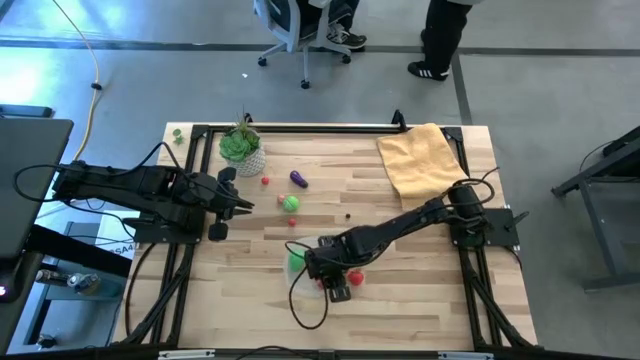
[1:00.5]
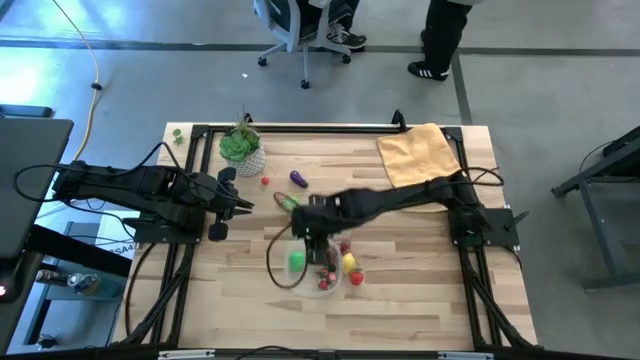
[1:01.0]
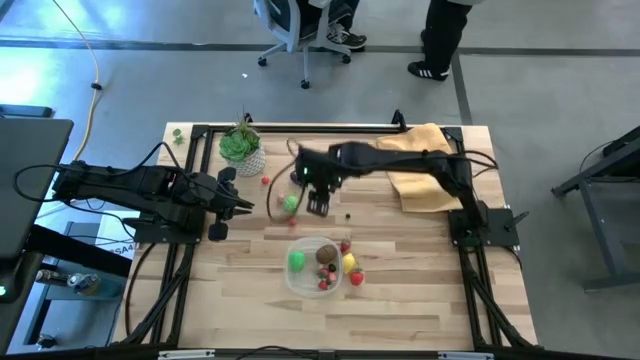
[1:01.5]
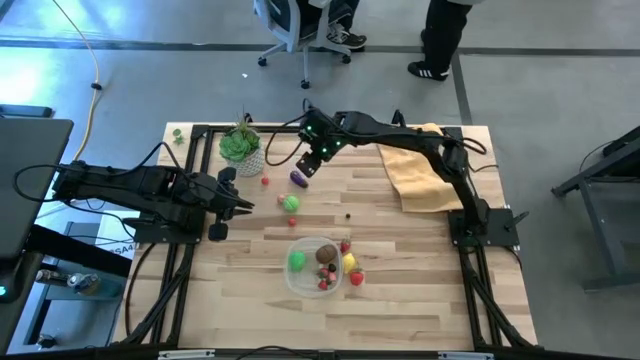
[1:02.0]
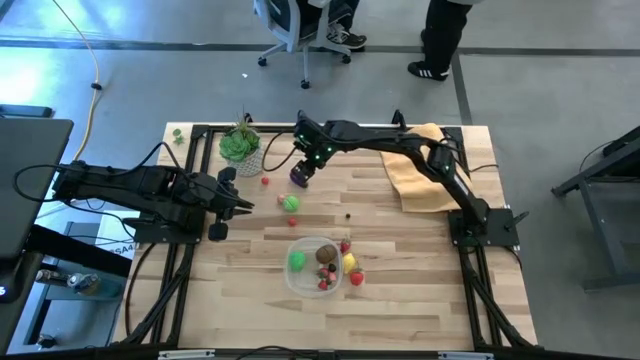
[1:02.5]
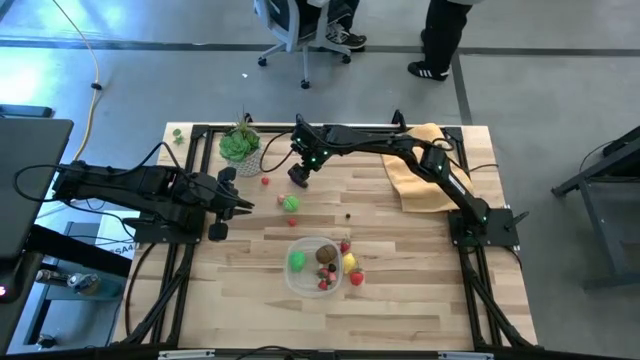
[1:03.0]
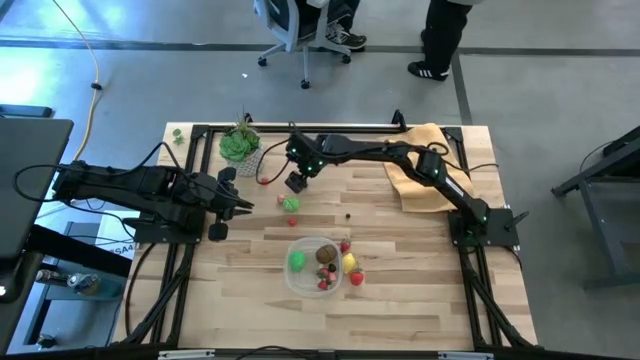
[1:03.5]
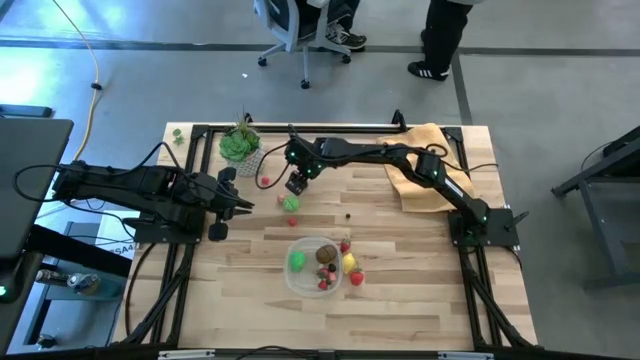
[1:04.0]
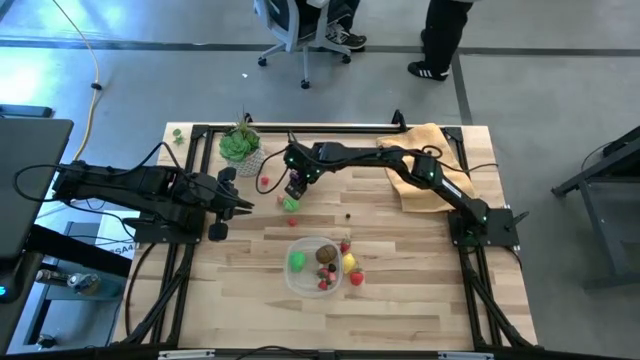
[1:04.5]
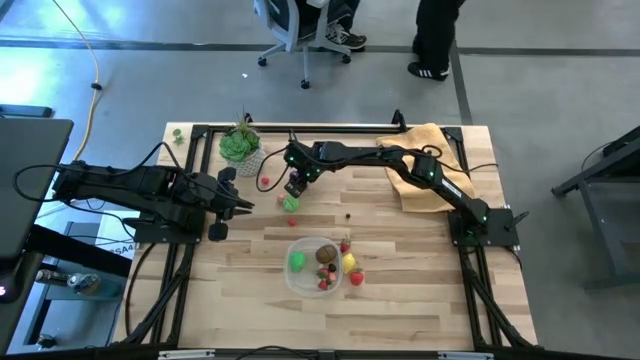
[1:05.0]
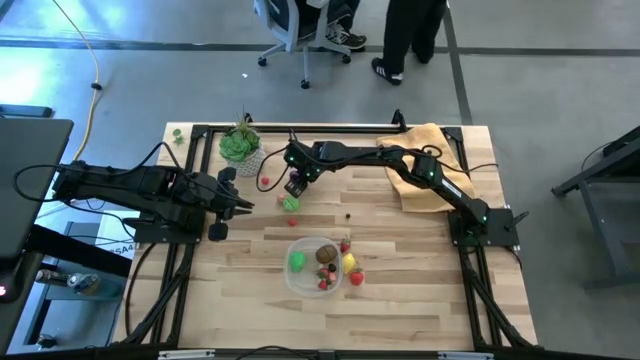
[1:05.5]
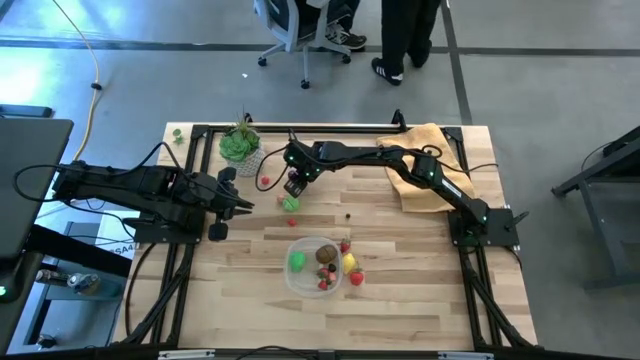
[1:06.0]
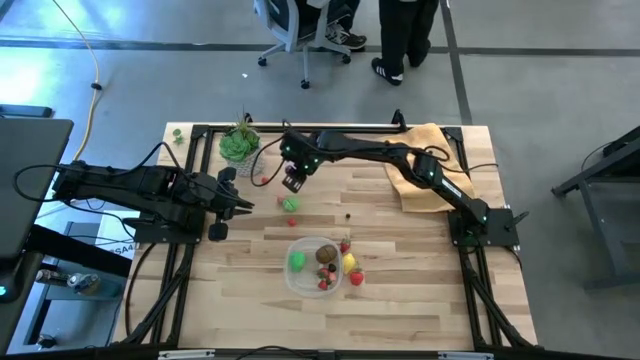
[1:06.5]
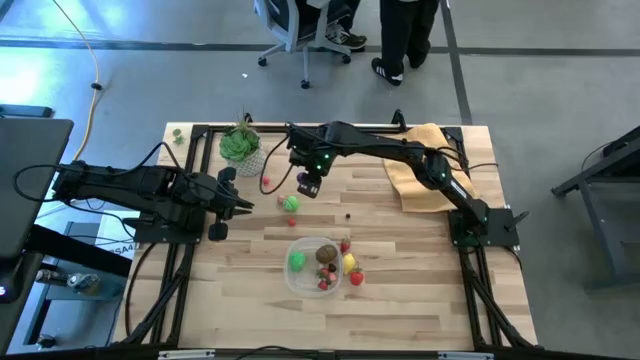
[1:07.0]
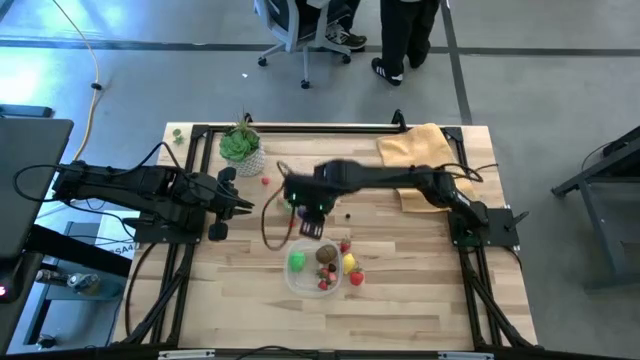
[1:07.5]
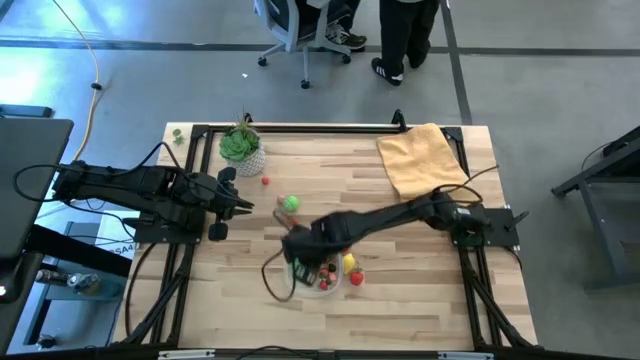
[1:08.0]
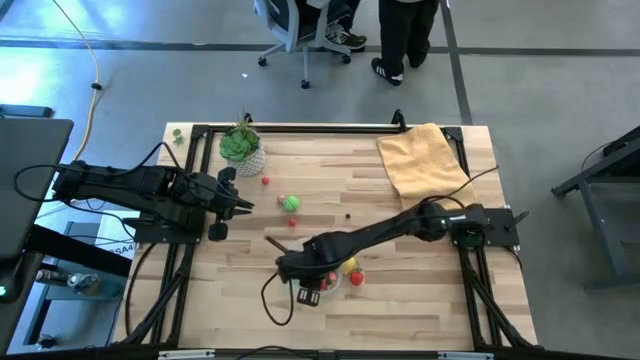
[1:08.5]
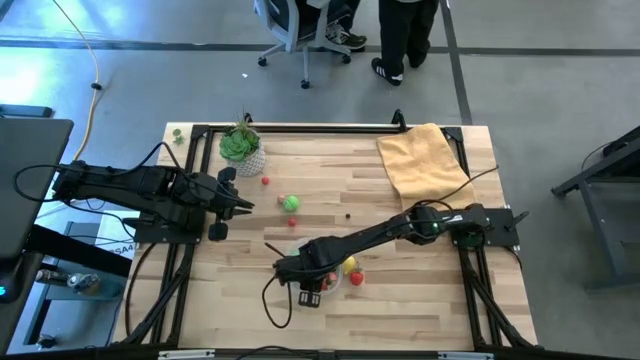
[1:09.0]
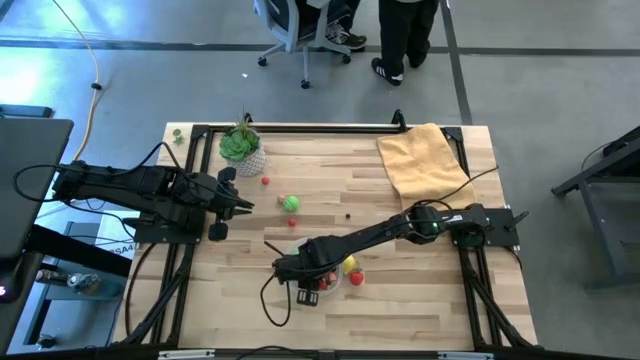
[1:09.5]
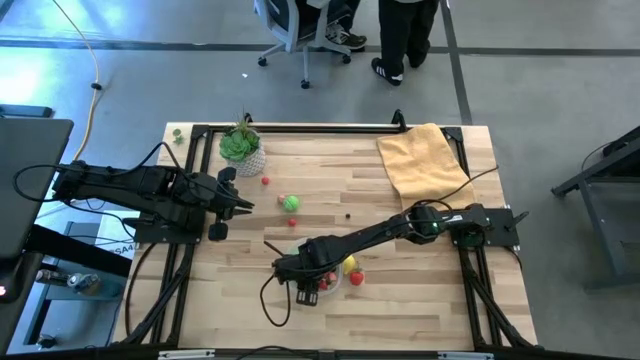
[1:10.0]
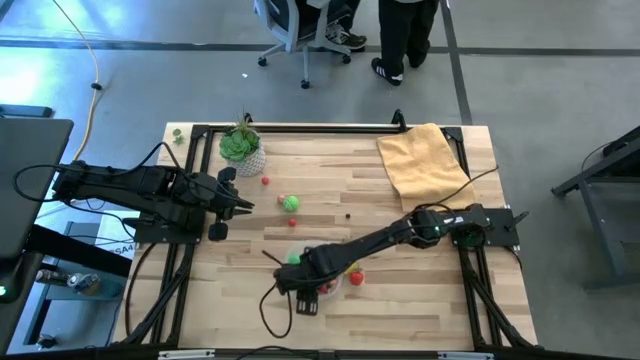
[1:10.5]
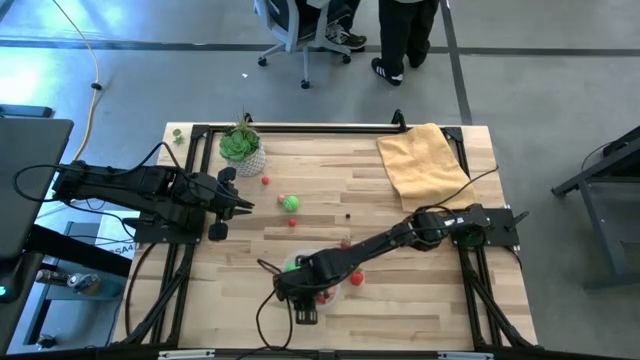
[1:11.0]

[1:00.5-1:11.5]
Task: Pick and placing Produce into tupperware
Put the violet eggplant into the transparent bin

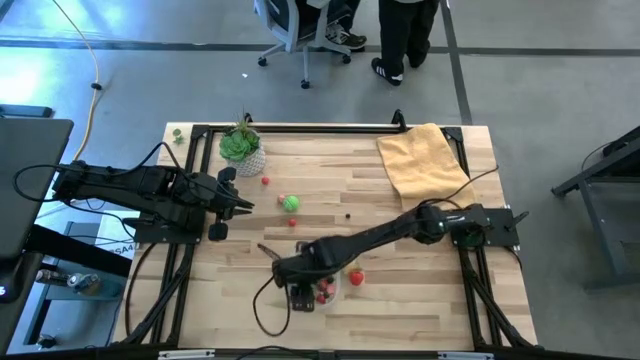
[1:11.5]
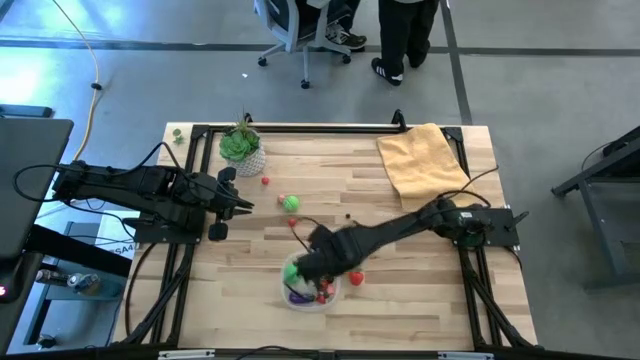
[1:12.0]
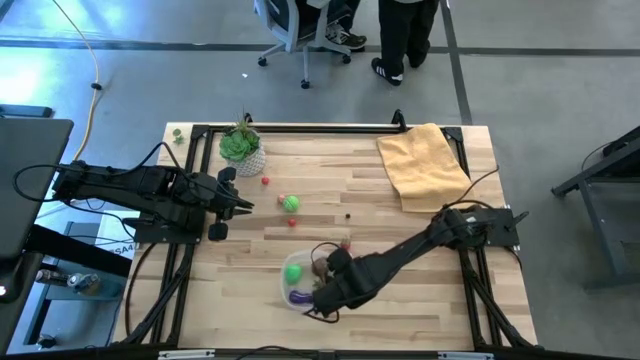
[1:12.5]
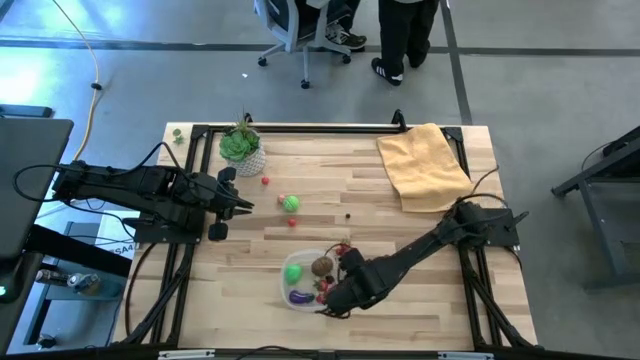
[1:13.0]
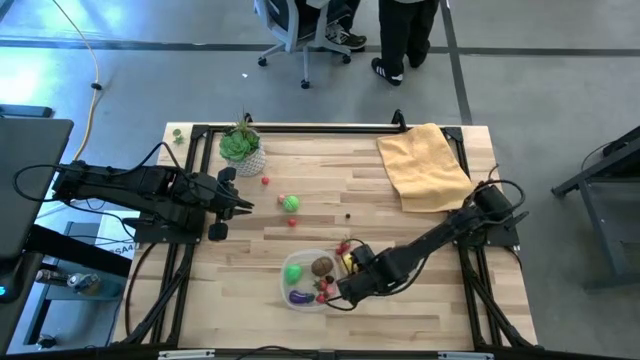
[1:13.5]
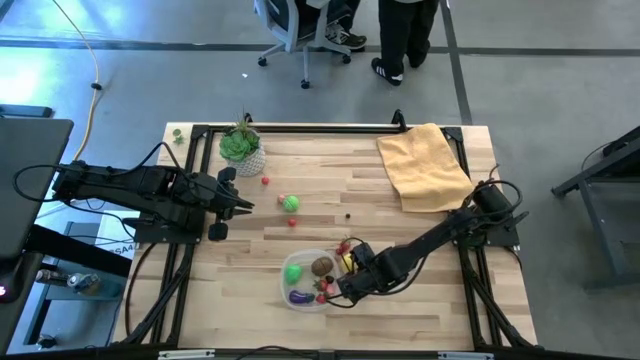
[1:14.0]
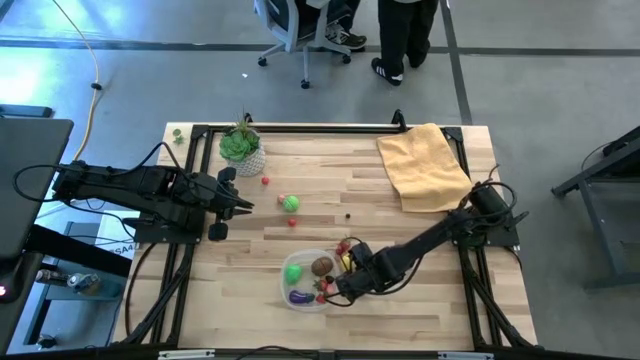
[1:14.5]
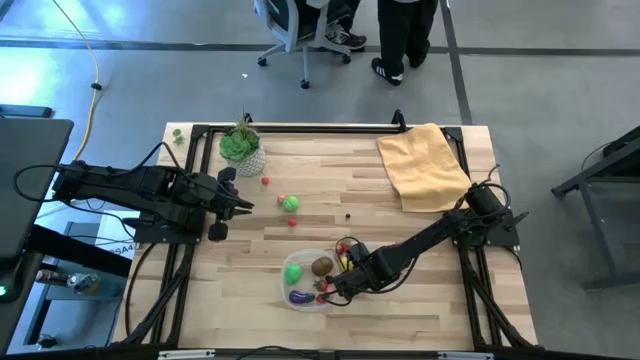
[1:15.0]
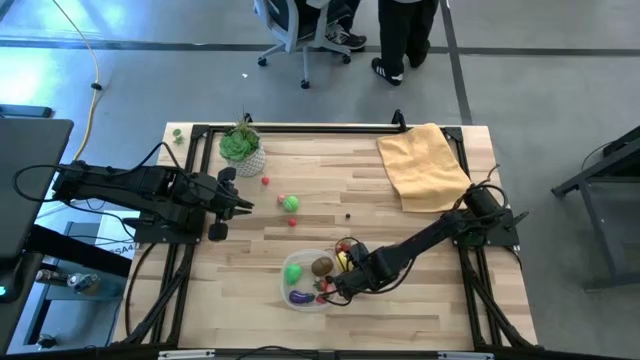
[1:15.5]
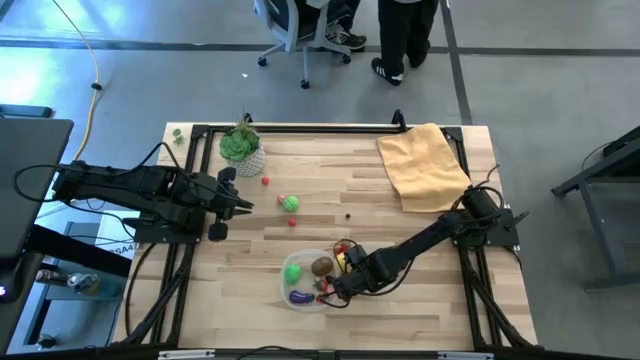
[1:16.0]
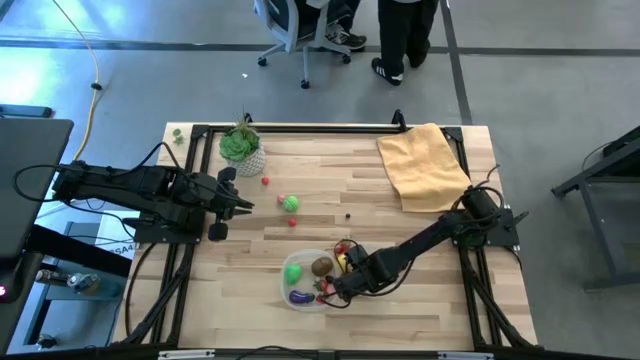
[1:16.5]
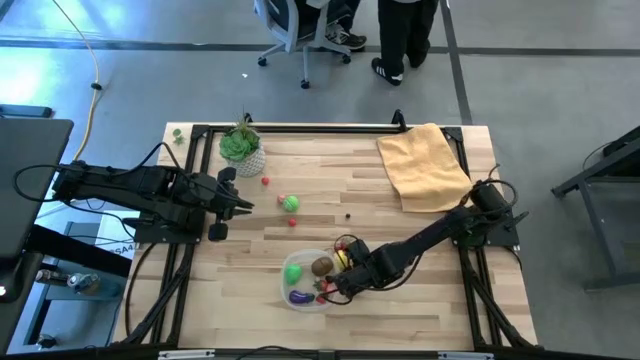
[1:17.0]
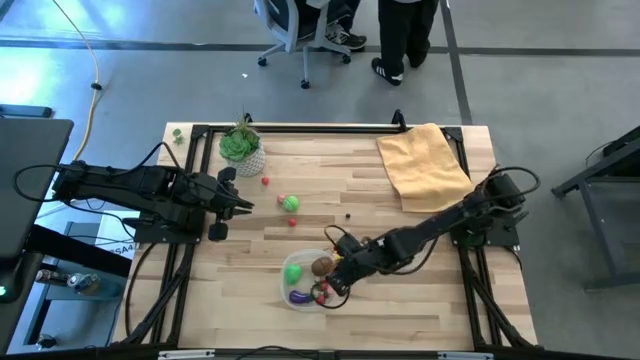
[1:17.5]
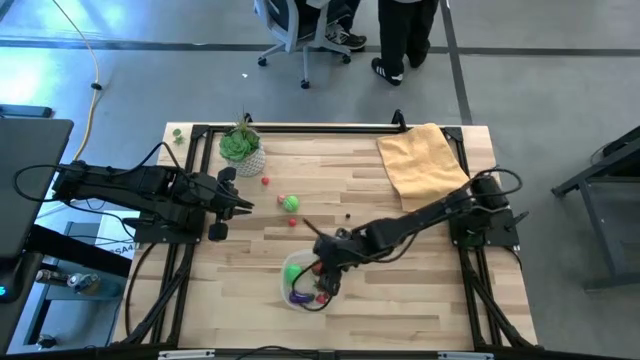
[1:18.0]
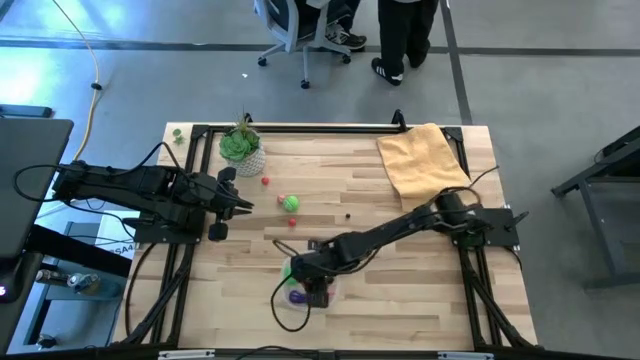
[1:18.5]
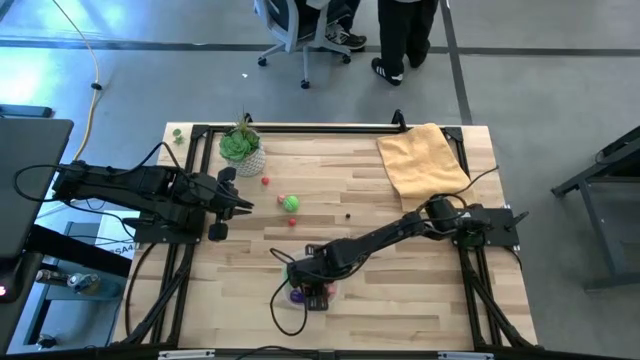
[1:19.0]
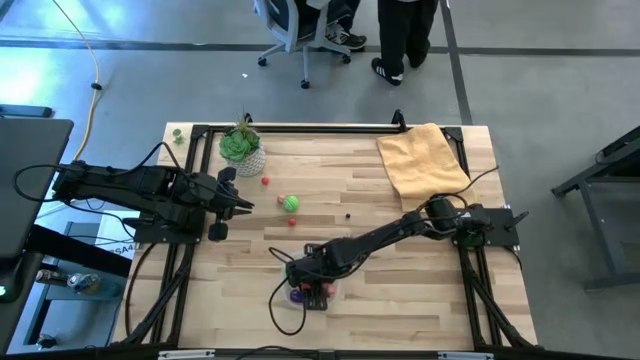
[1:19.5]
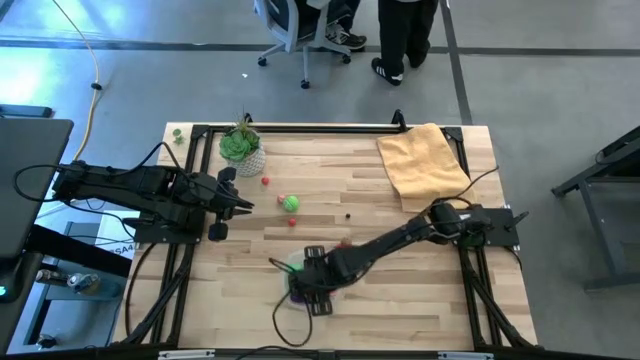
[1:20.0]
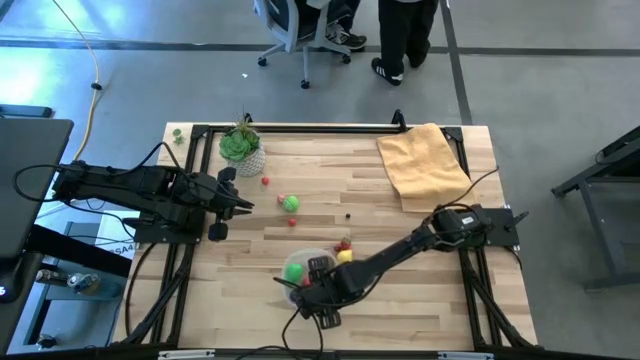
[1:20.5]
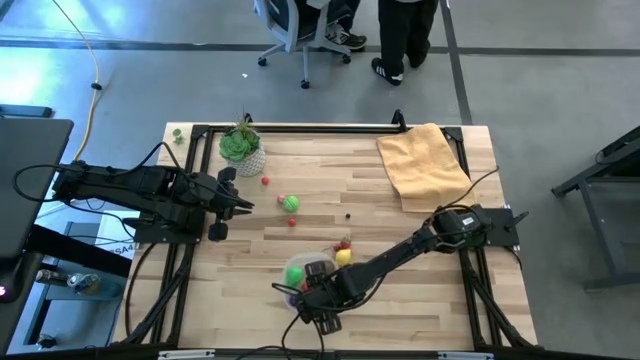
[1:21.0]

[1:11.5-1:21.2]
Put the red strawberry into the transparent bin

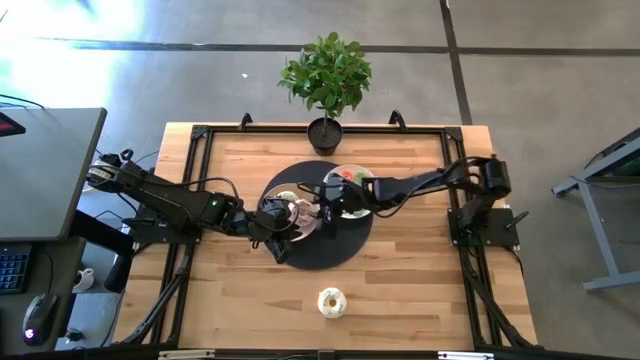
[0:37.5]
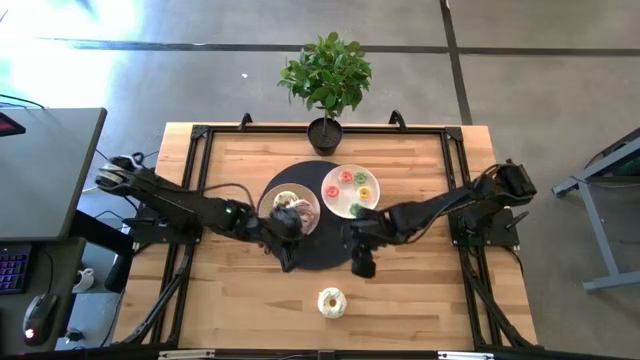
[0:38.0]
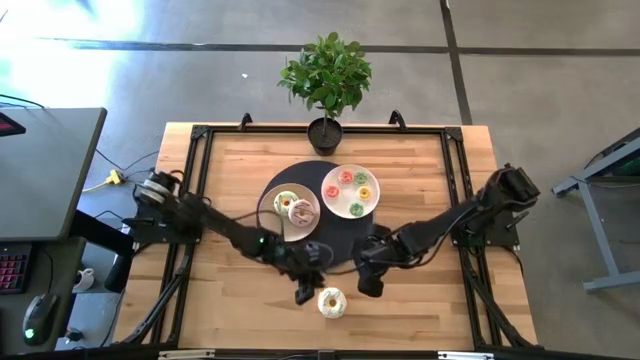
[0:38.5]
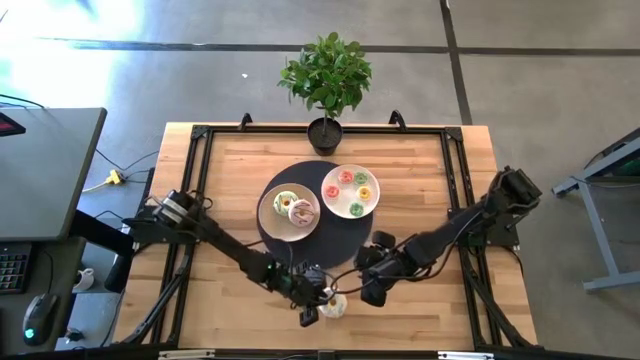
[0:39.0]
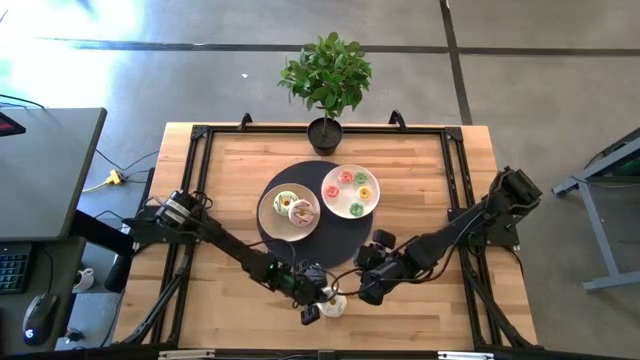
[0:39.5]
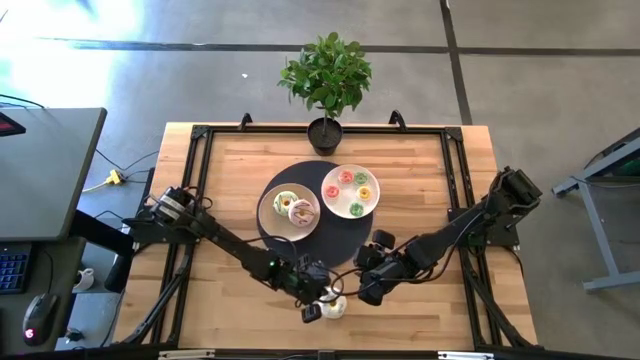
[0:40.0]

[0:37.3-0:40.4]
Task: Pick & Place donuts
Put the big white donut on the left white plate
